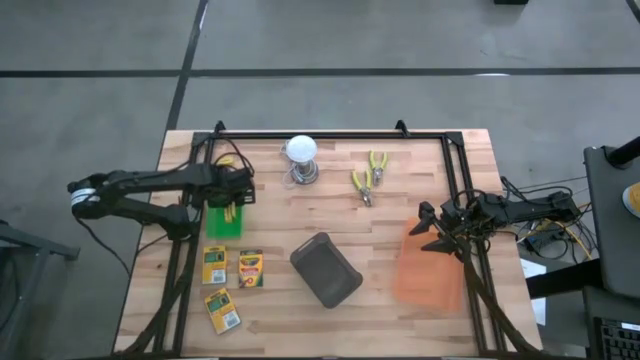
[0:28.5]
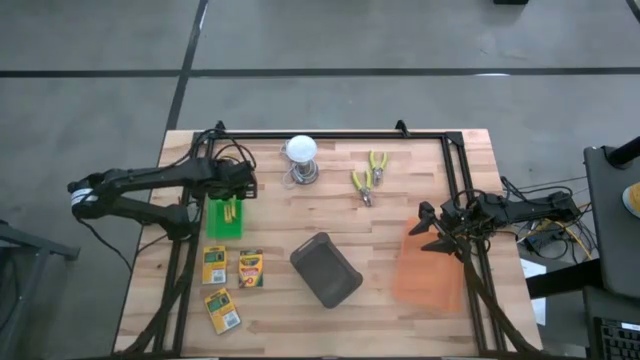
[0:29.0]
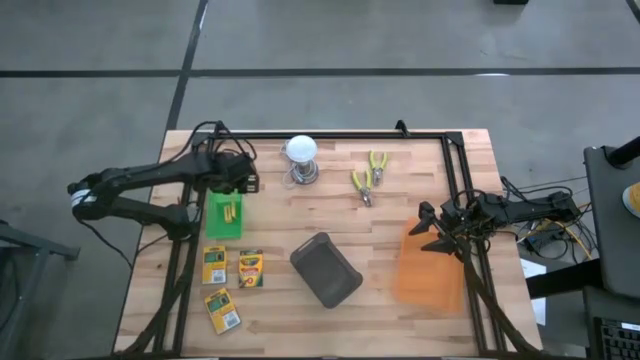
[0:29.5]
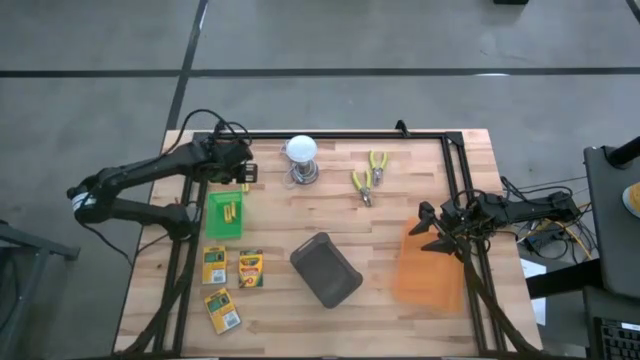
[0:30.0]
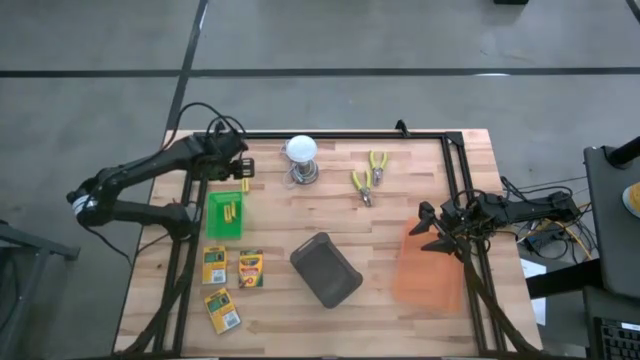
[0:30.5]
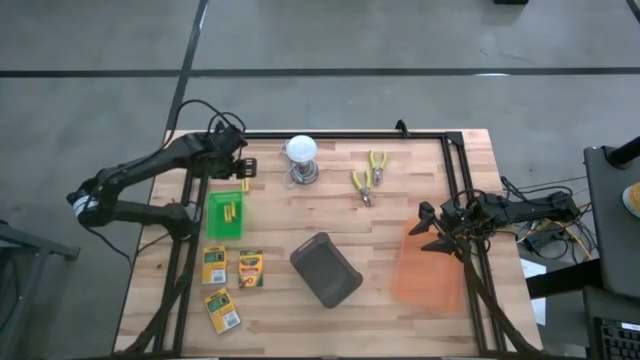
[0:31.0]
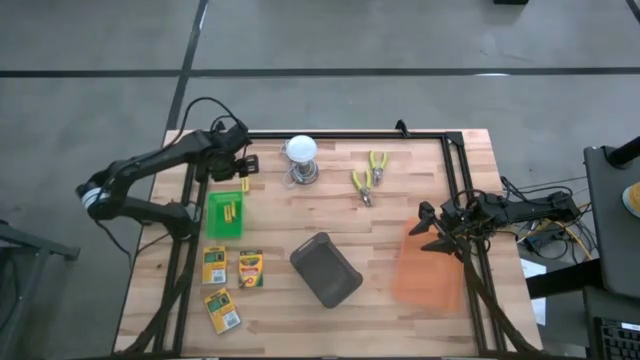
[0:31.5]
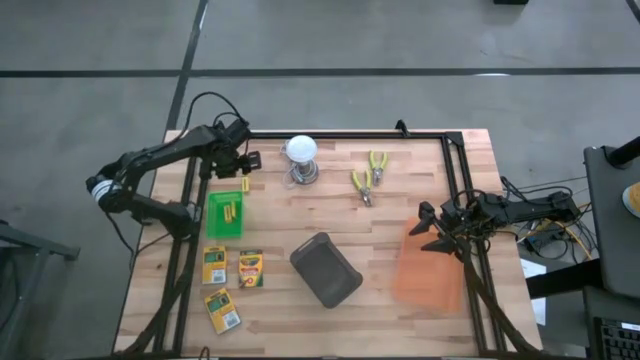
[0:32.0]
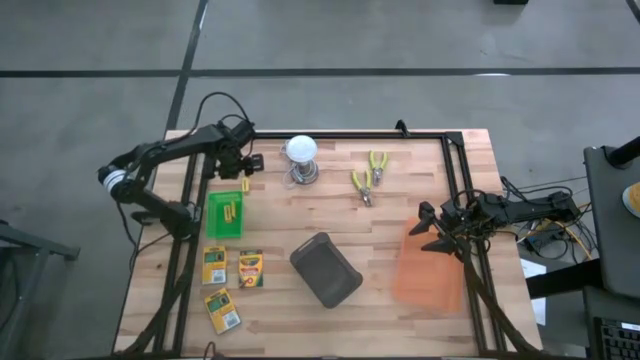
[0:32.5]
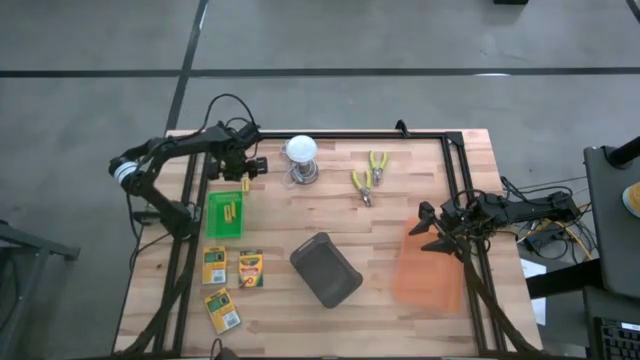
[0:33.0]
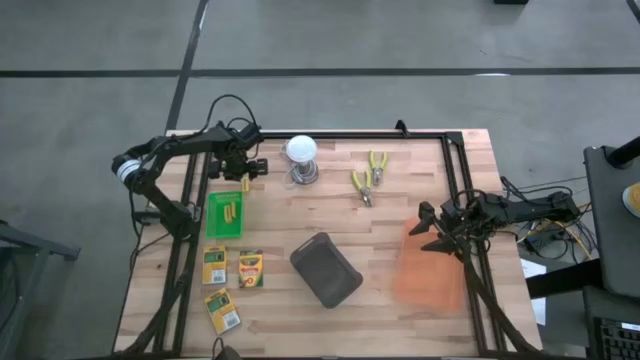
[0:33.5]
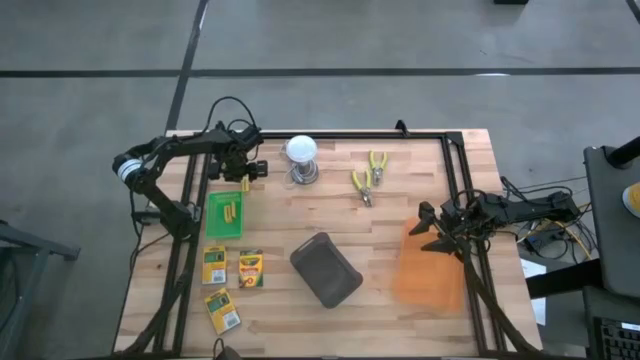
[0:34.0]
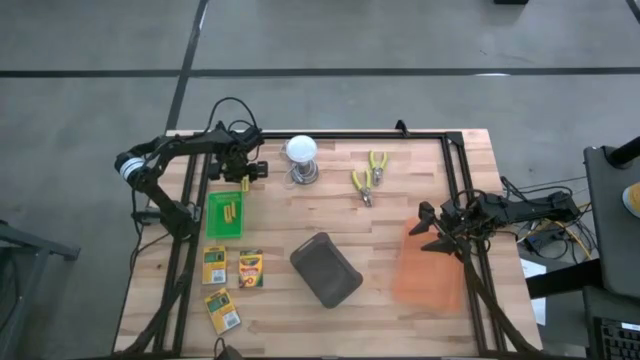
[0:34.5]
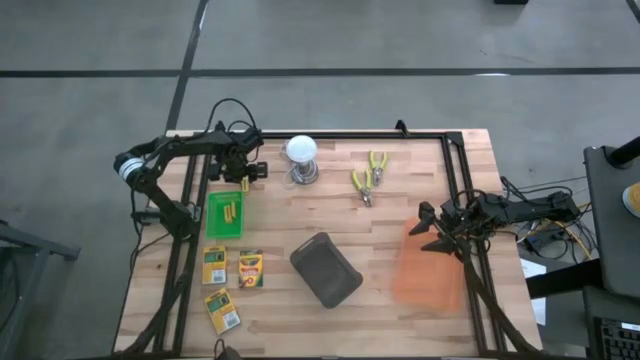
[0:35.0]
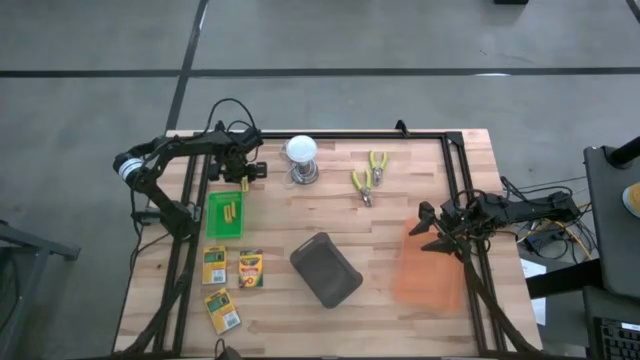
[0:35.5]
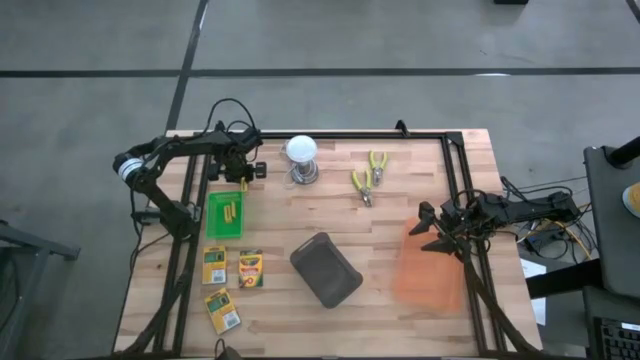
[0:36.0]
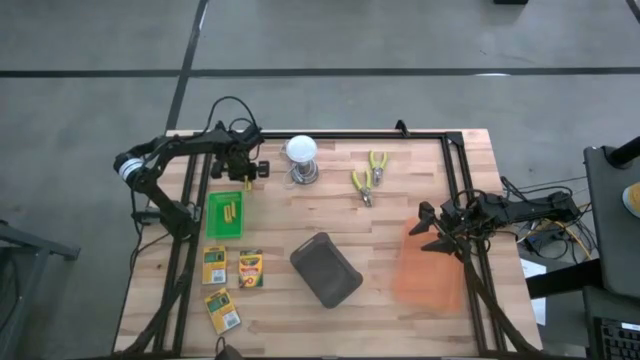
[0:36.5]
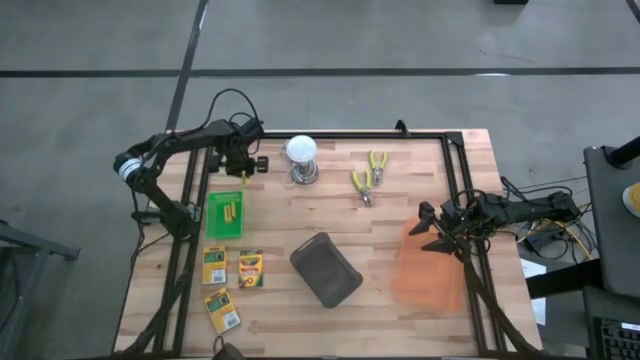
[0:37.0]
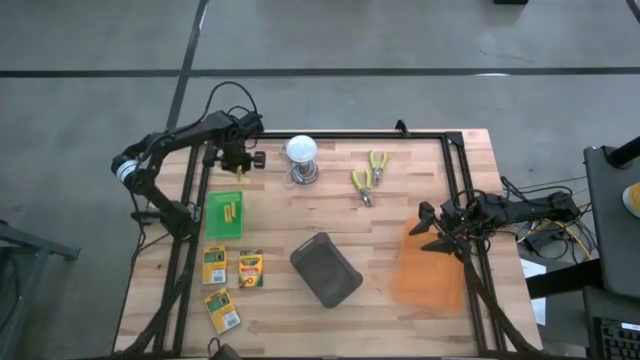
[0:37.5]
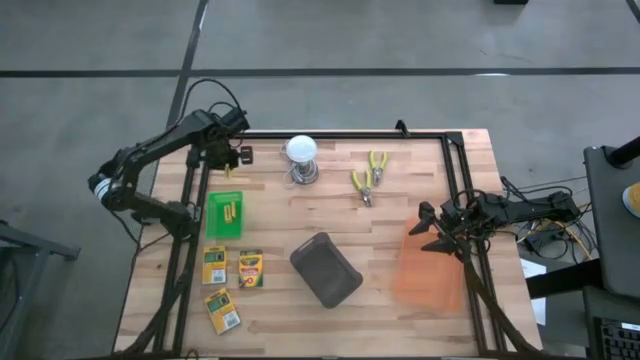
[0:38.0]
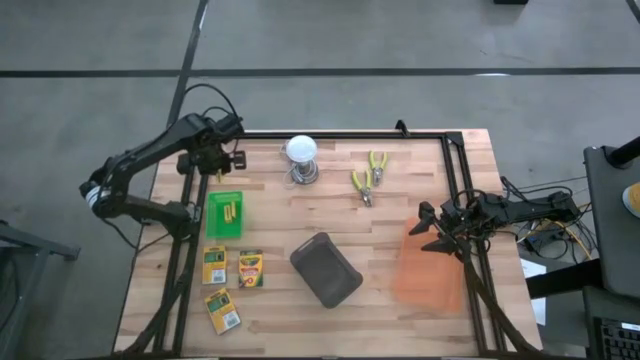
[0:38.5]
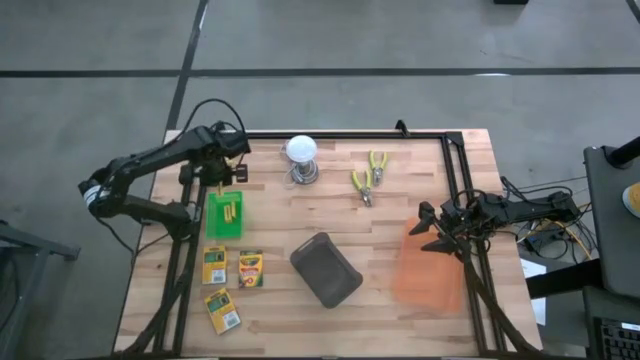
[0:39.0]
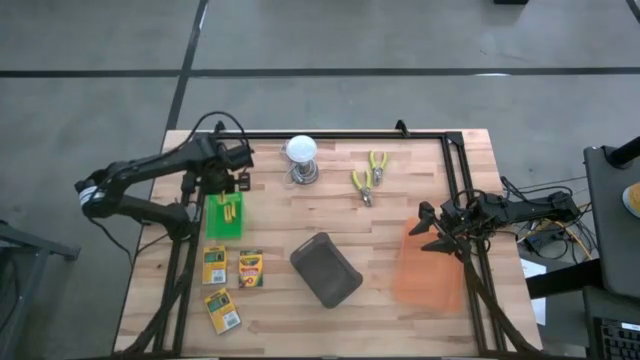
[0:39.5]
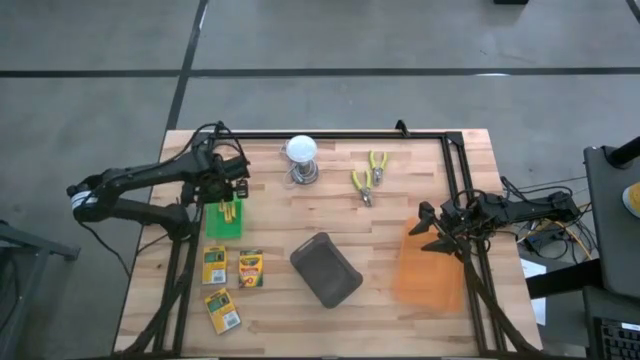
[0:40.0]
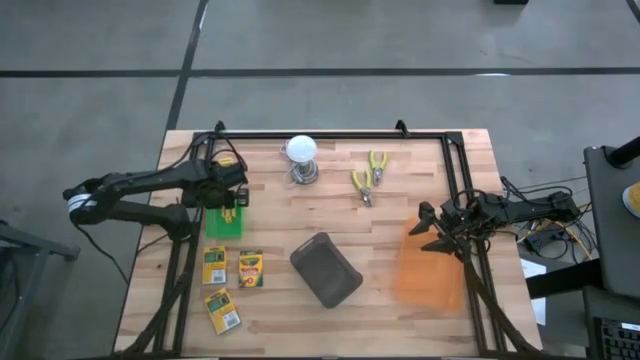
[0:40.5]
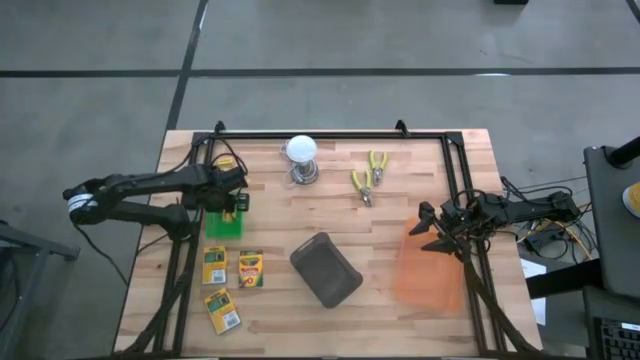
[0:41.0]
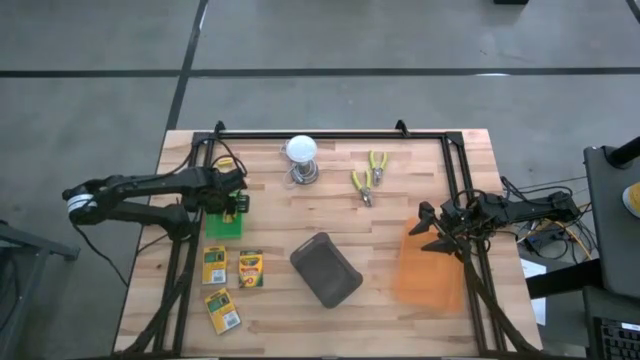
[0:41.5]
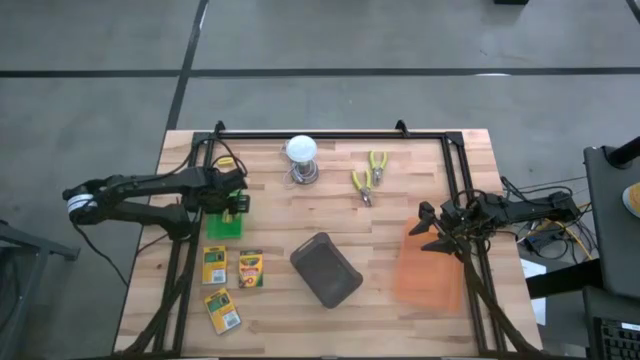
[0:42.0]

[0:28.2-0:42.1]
Task: Pick & Place School Supplies
Put the yellow eraser into the green bin

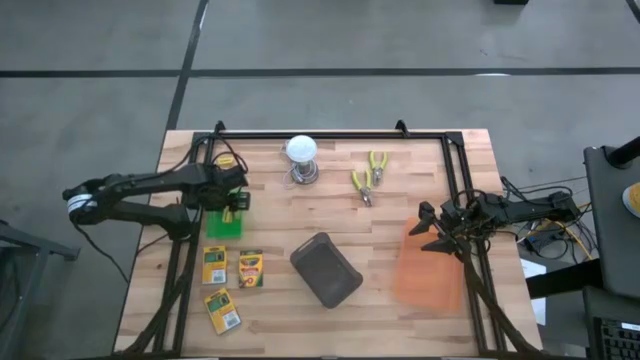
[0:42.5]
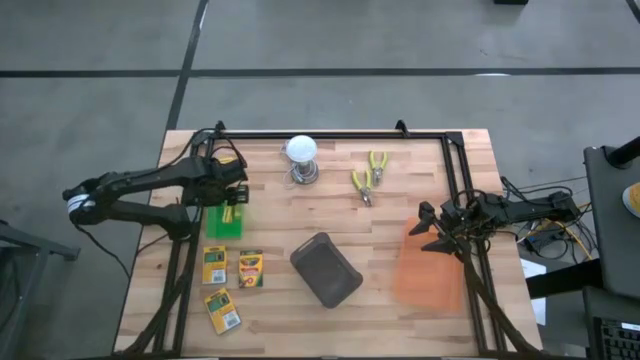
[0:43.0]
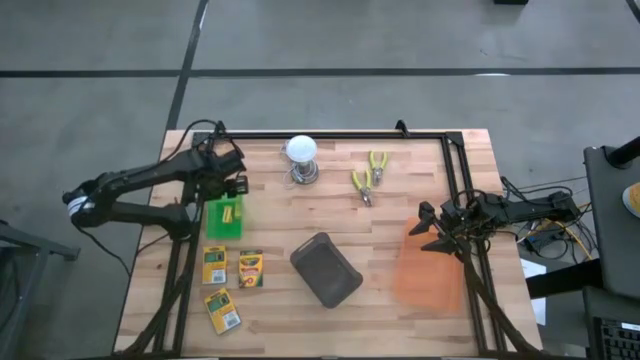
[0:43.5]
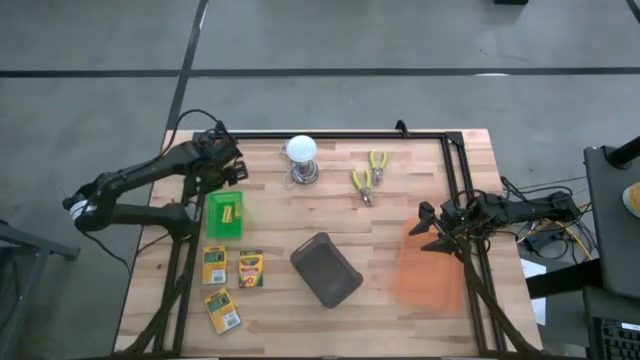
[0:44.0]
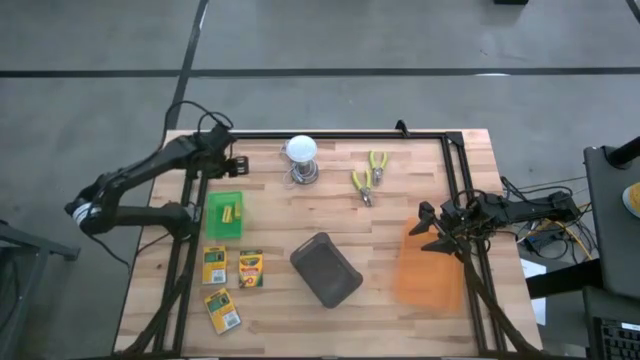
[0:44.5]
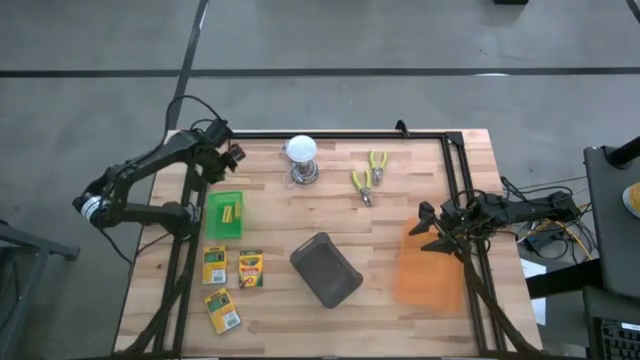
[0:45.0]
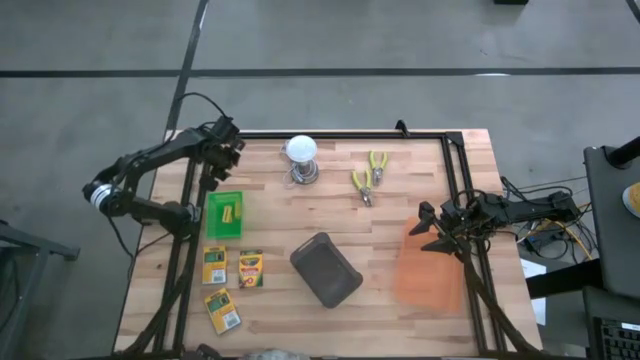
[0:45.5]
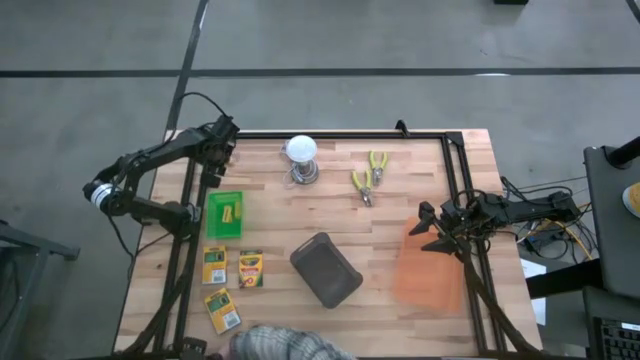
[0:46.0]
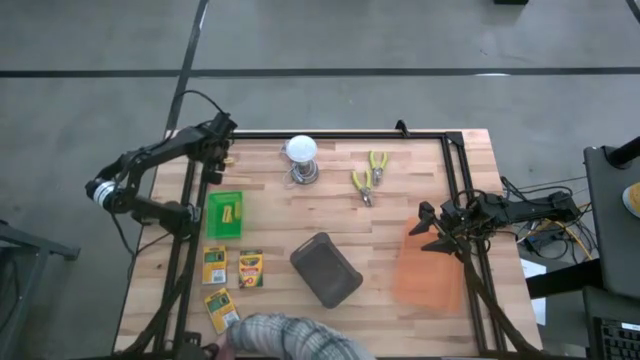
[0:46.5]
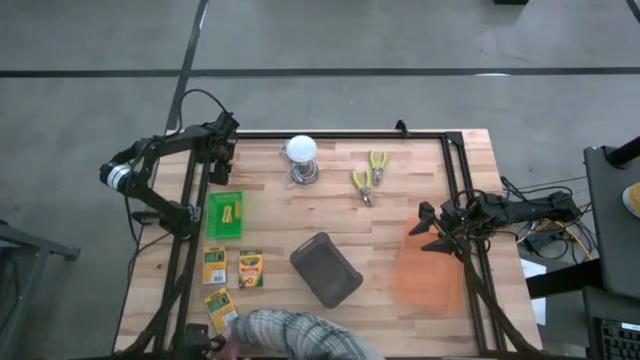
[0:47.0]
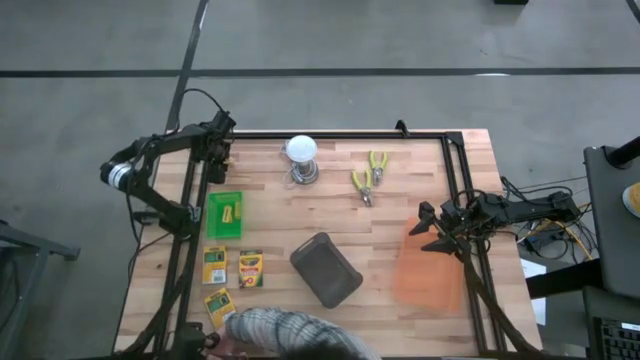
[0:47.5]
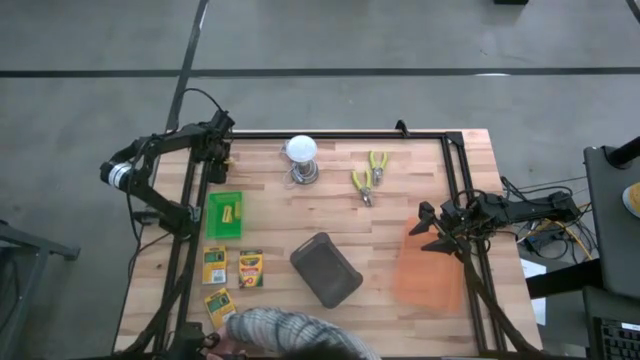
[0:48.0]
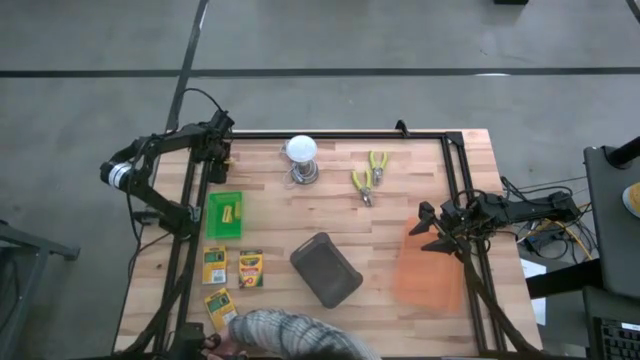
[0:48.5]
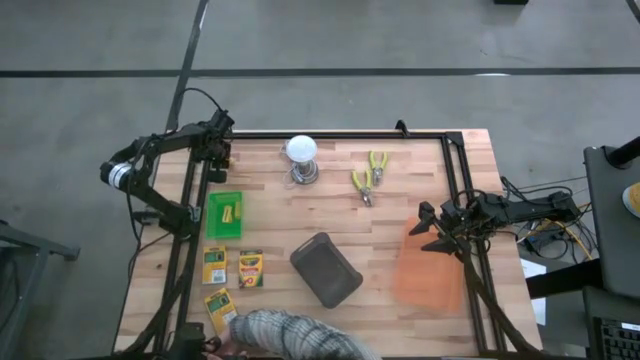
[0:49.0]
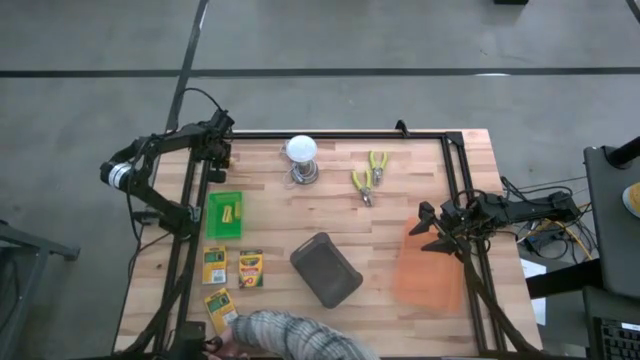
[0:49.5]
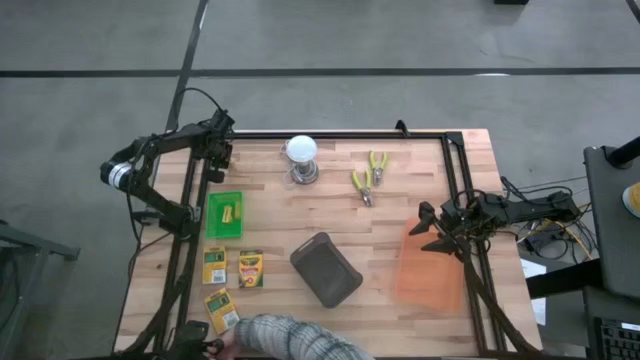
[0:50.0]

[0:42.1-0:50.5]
Put the yellow eraser into the green bin

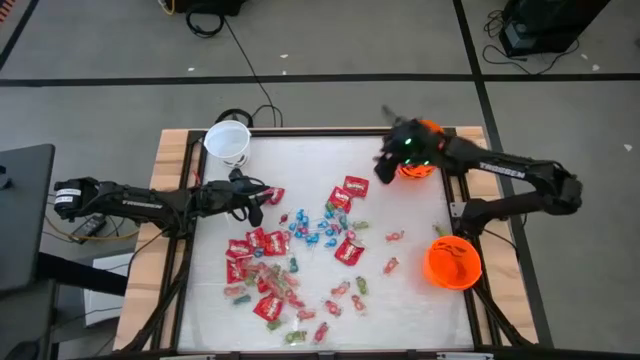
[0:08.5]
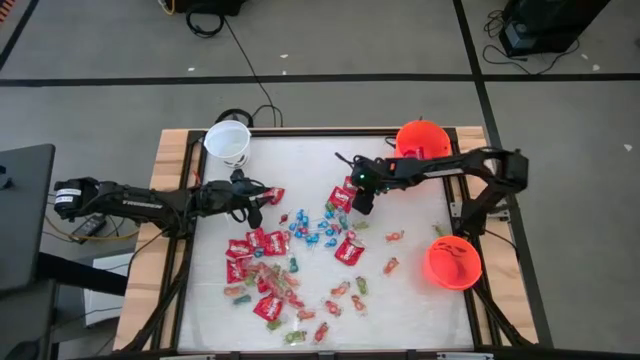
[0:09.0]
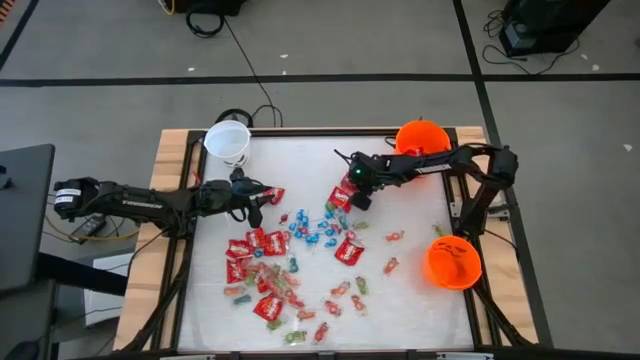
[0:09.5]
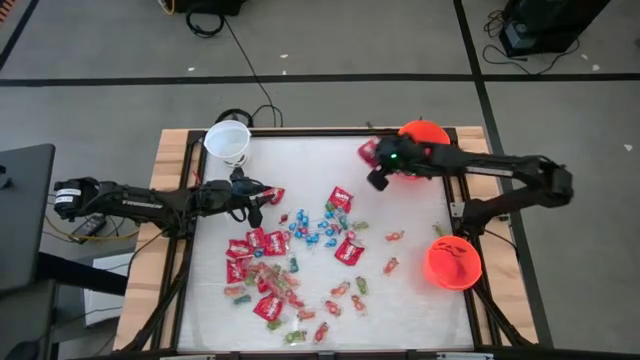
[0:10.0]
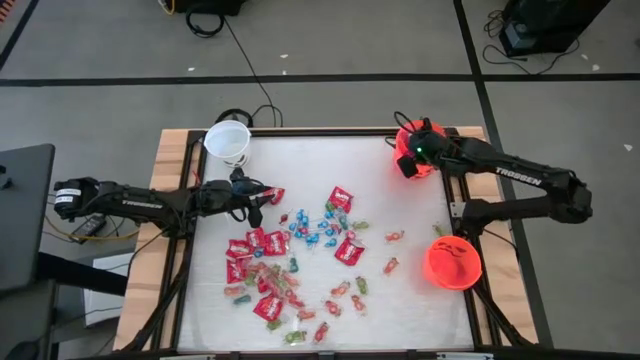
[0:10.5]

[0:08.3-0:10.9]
Task: Sort candy by brand, put in halloween buckets
Put the red candy into the top orange bucket
